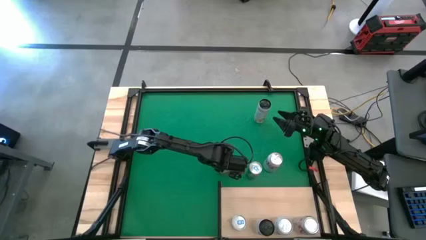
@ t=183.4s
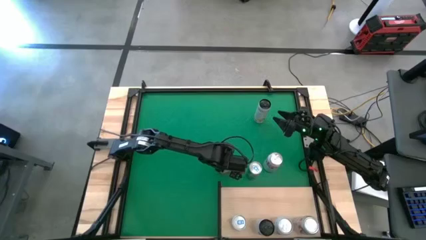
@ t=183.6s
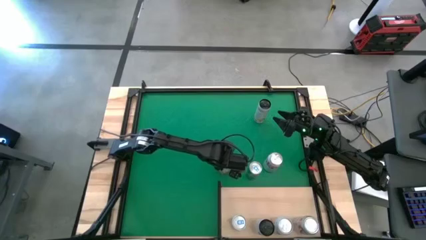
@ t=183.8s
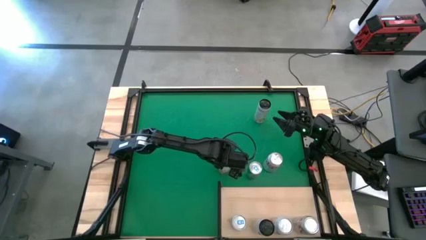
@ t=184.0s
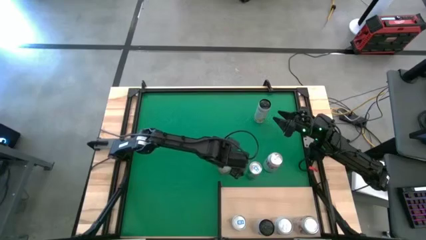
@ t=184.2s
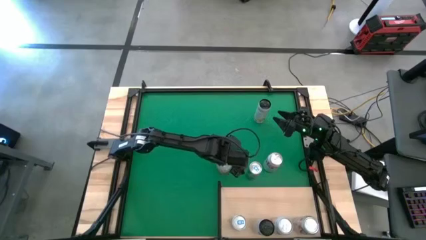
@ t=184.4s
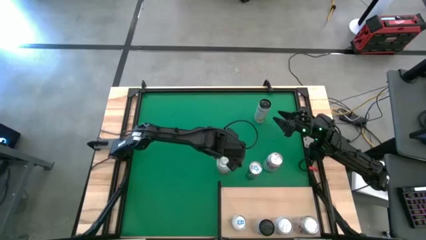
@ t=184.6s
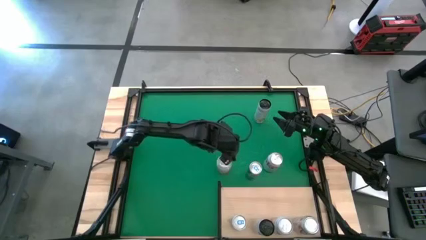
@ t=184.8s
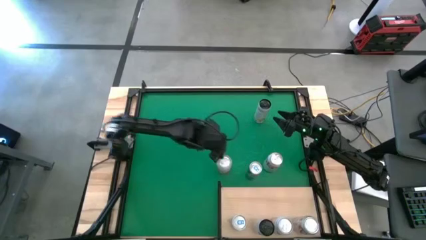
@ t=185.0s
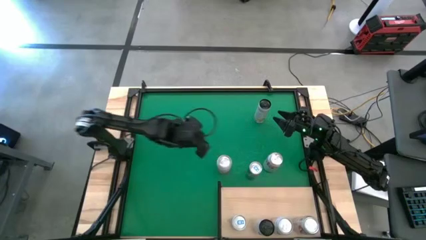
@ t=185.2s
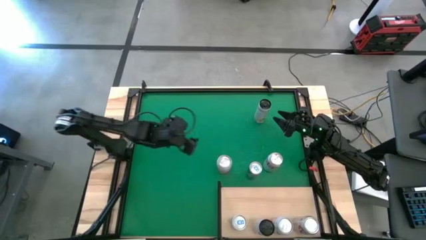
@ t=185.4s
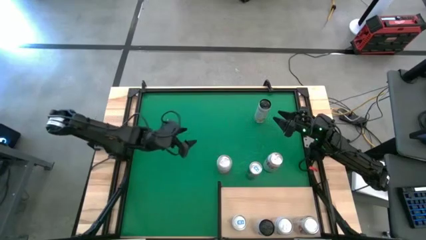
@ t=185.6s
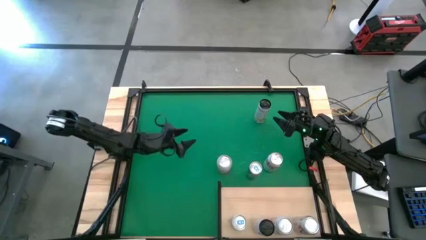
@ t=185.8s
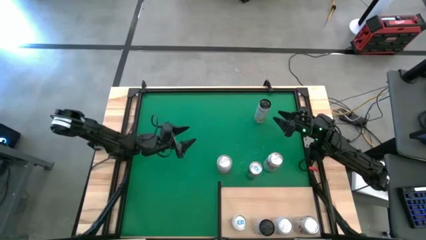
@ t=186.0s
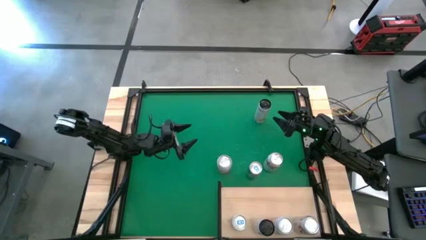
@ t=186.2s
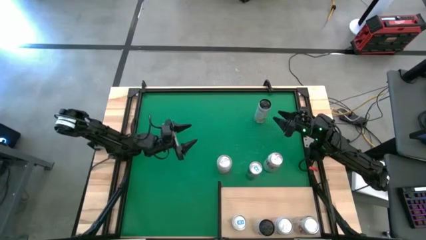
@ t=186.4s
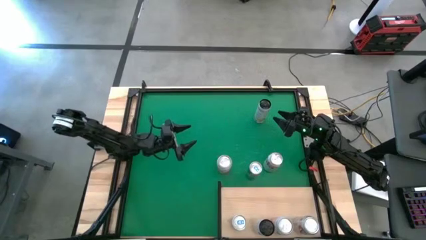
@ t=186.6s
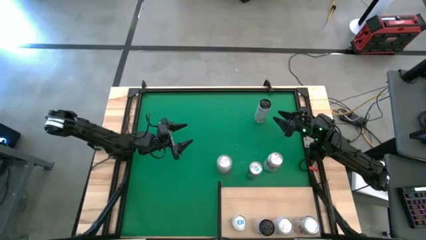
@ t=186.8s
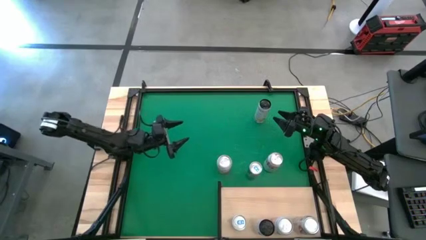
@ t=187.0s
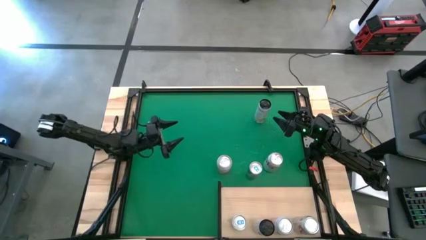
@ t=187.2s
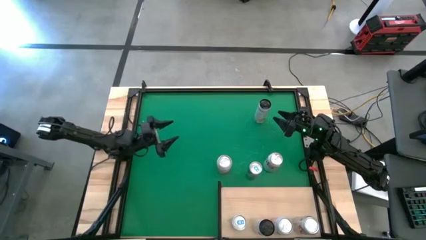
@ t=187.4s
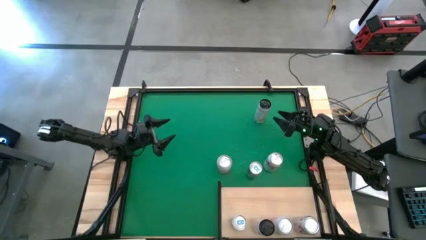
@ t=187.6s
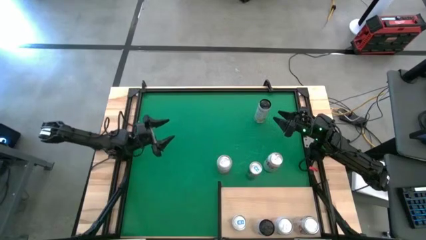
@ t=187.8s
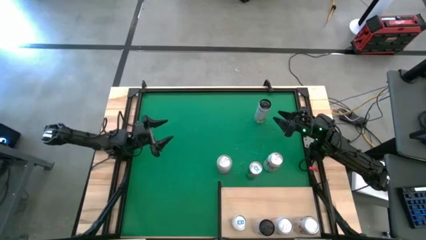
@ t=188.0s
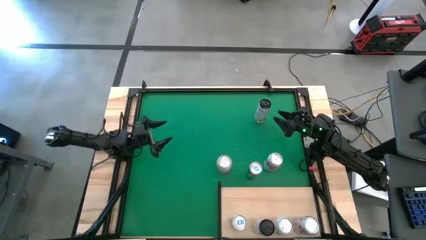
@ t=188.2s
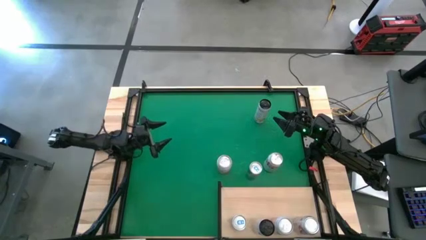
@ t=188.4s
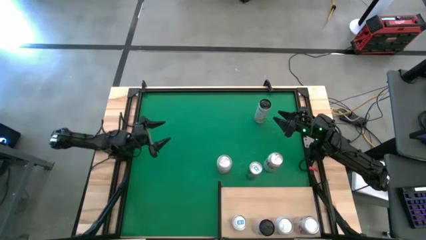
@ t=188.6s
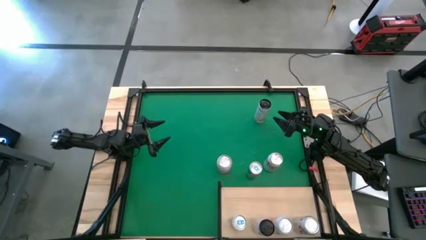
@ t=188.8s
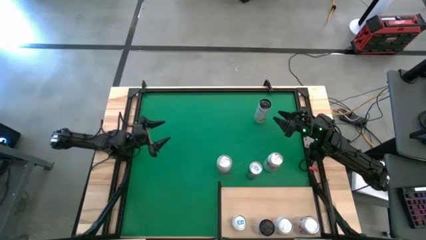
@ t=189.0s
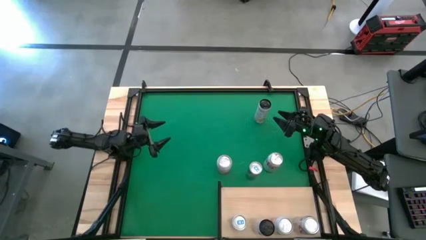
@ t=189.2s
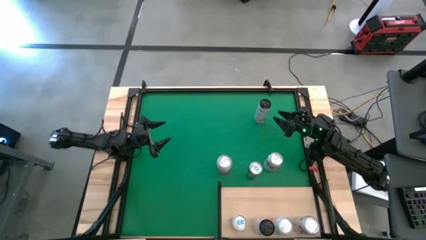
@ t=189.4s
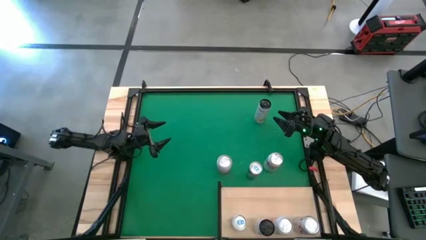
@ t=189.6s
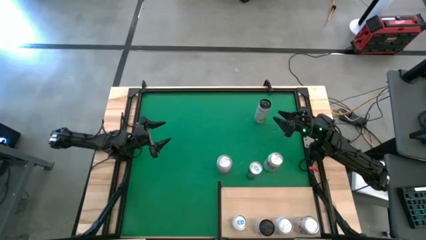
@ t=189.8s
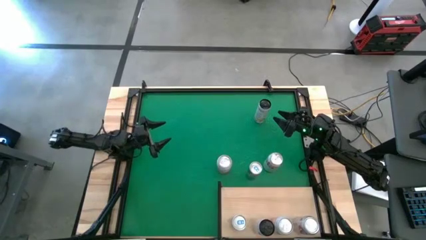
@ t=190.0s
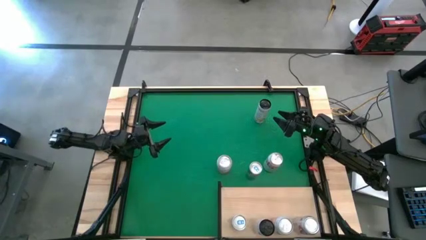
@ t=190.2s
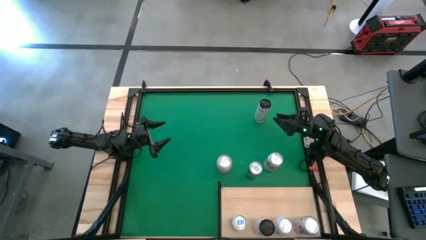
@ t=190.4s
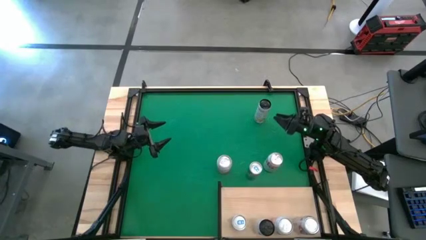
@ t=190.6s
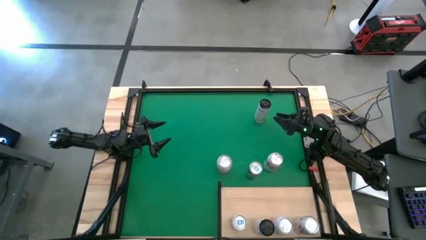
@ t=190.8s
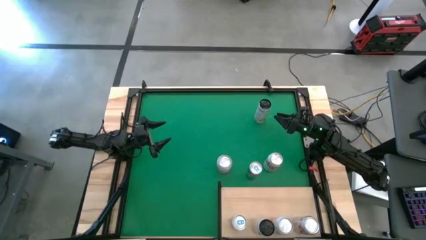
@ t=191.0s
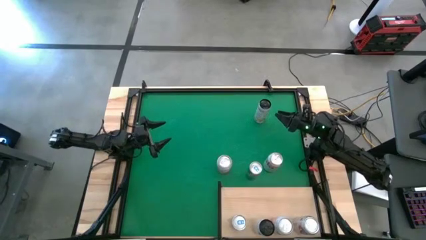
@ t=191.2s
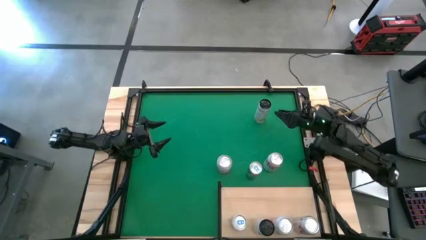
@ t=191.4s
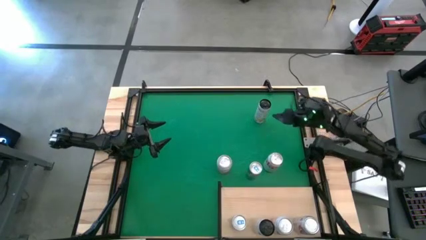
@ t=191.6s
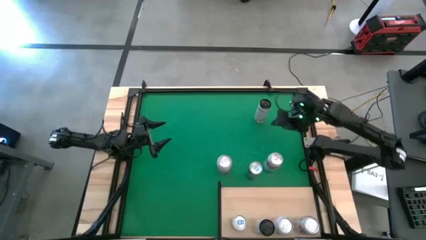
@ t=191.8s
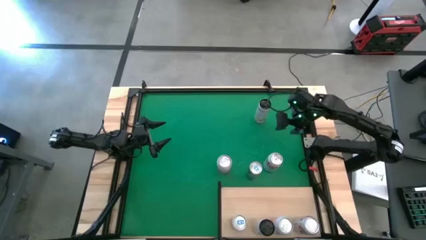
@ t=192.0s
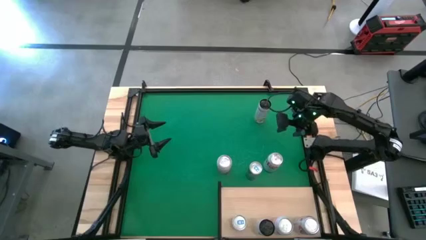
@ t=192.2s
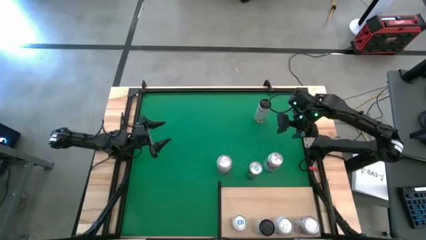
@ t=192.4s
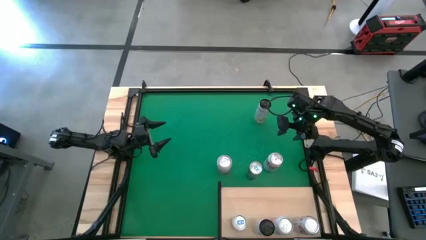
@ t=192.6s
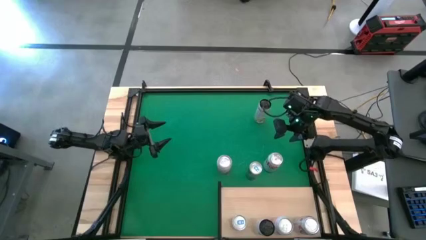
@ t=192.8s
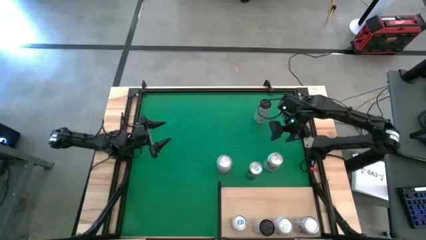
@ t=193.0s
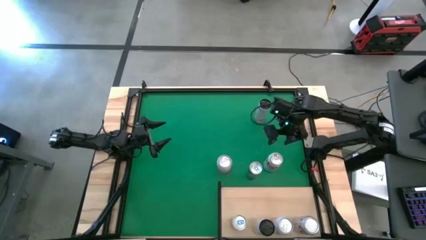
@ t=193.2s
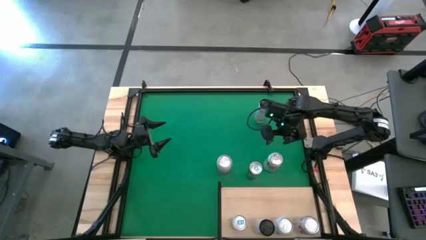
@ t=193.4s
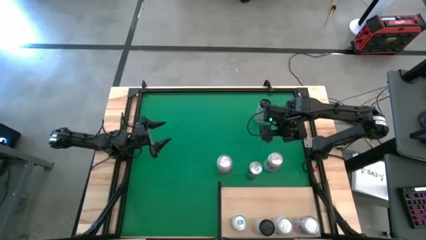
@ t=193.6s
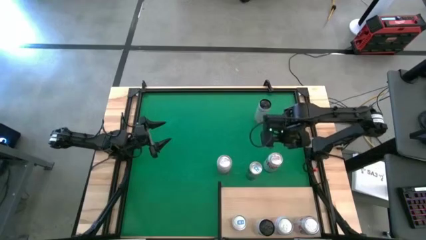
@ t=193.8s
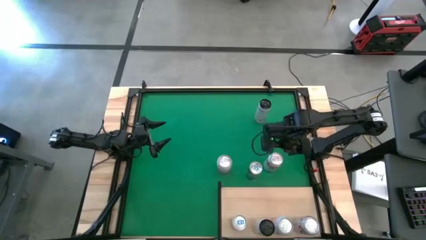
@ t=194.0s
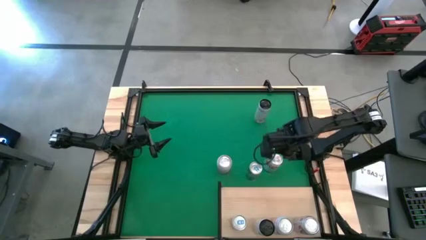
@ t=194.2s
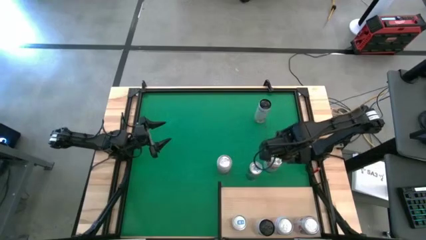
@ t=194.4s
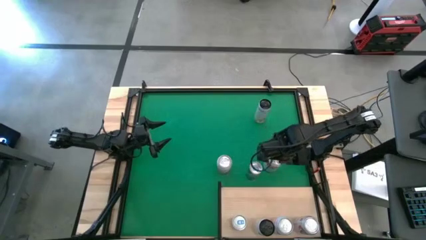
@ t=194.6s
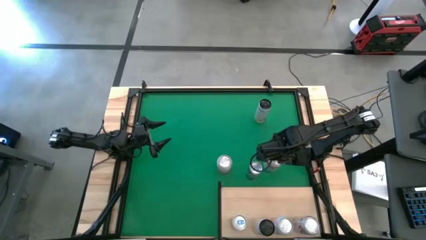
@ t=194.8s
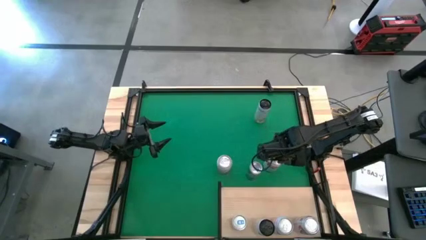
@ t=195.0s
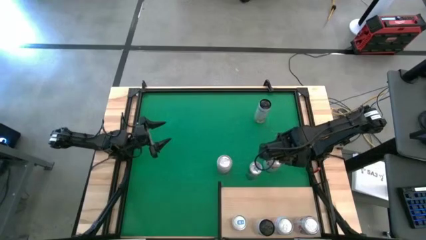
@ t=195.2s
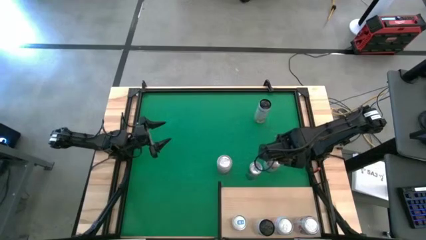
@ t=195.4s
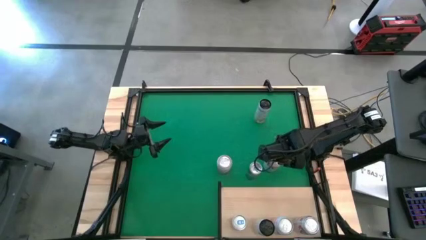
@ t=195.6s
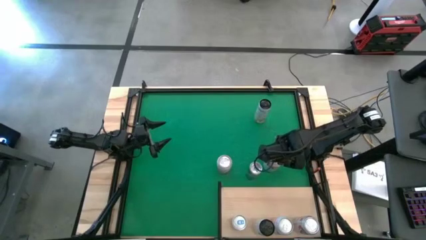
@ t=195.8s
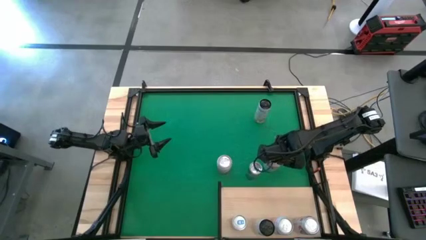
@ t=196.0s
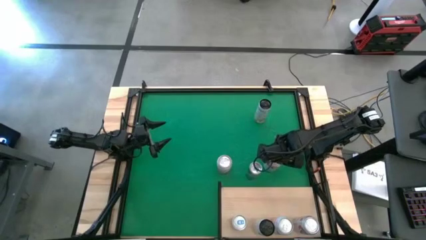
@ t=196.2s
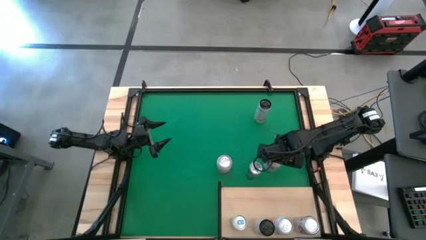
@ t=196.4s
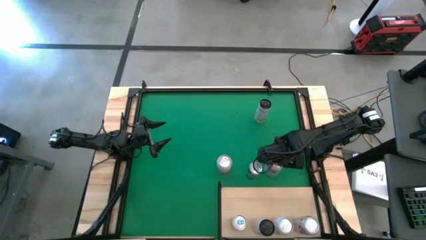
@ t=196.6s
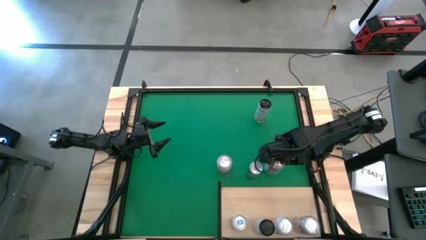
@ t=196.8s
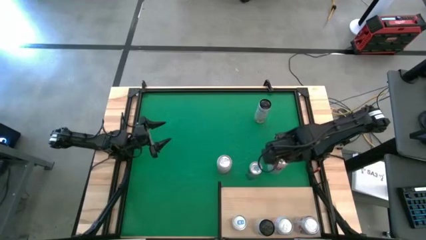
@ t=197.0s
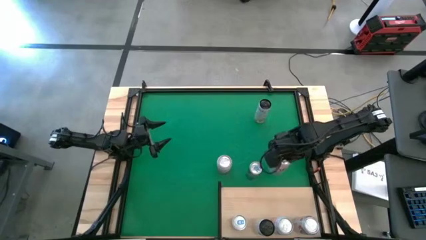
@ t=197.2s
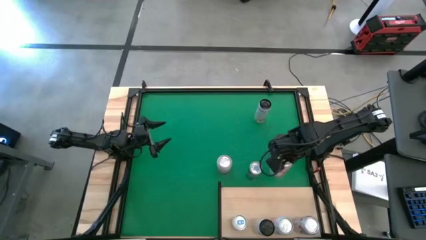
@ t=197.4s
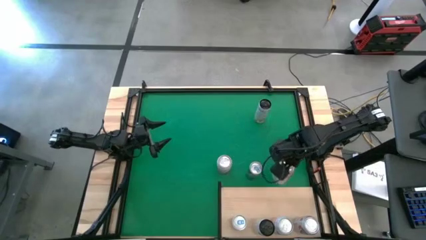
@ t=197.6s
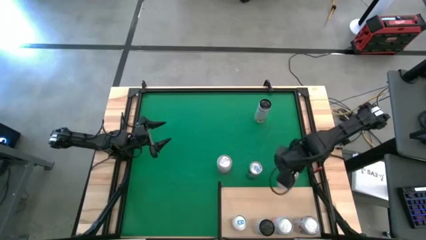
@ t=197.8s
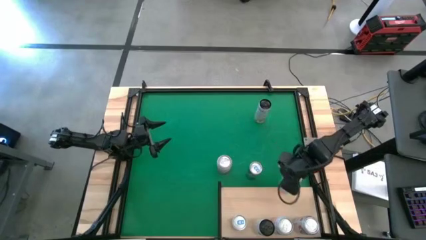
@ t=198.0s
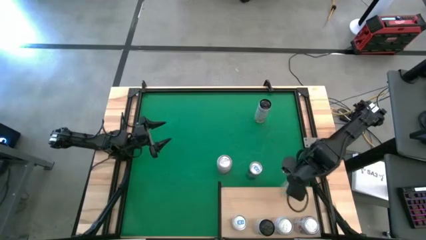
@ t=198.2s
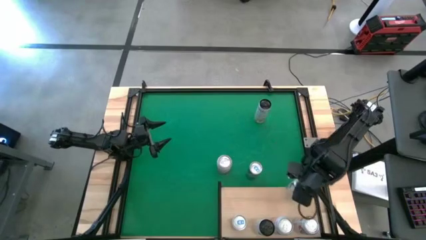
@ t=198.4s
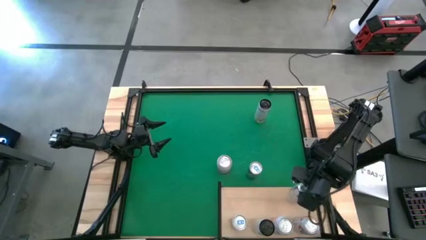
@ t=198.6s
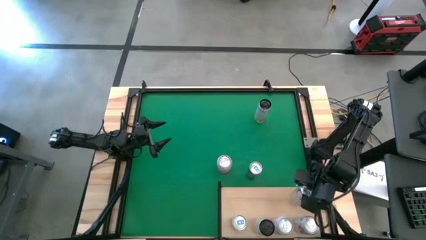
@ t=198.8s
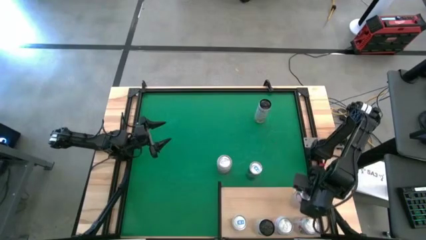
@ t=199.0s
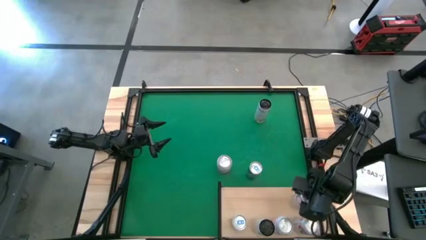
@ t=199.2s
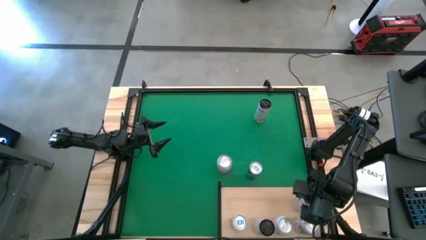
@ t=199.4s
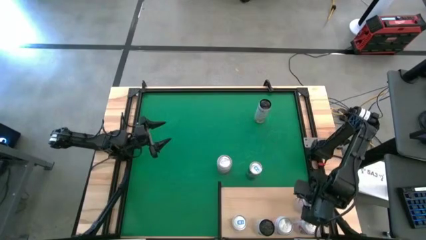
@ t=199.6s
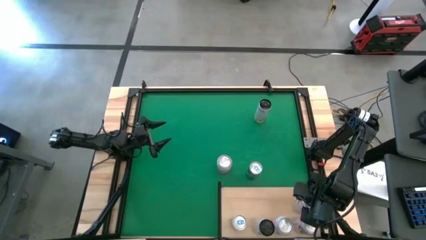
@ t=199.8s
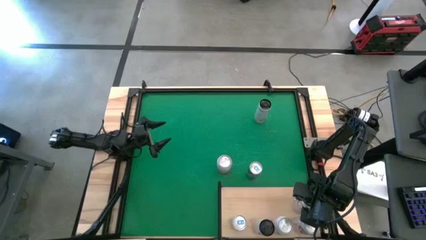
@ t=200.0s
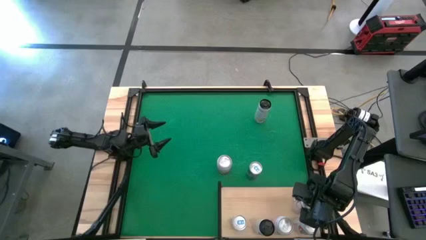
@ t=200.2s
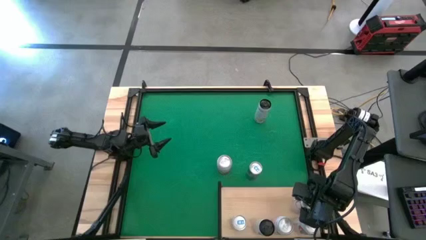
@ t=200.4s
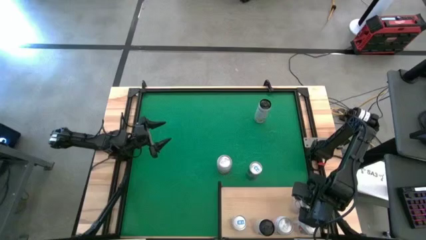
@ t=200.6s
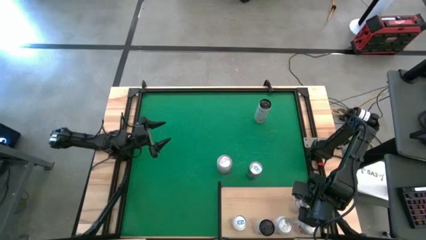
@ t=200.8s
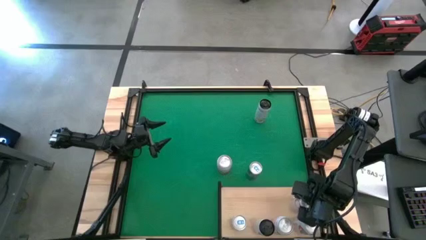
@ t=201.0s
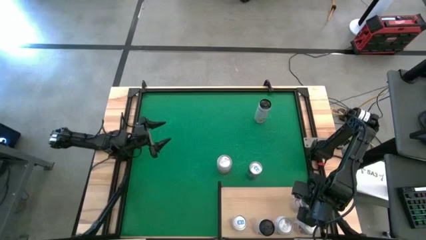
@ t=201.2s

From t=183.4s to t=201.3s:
Task: Place canned beverage on shelf
Put the red-silver soda can aligned with the red-silver soda can on the shelf
